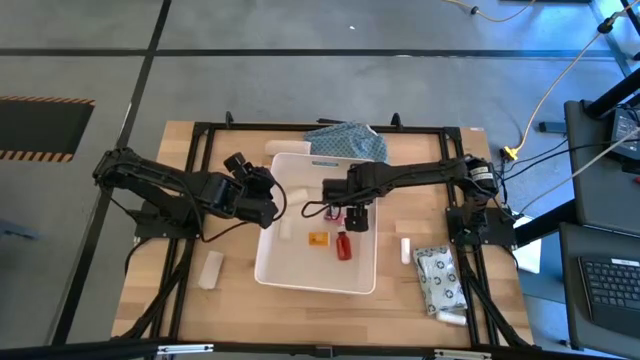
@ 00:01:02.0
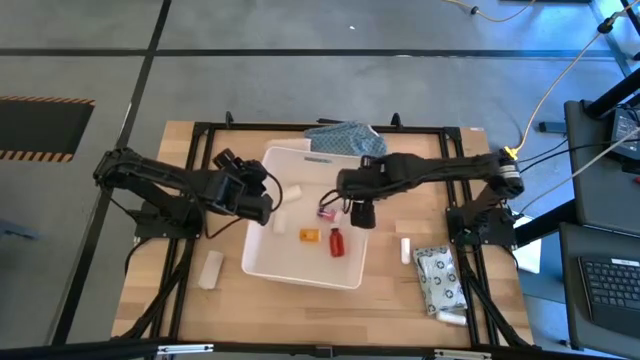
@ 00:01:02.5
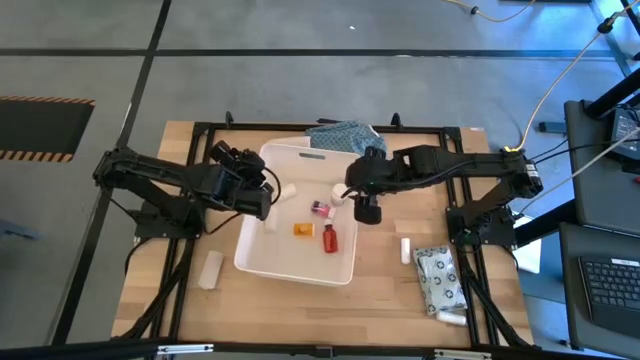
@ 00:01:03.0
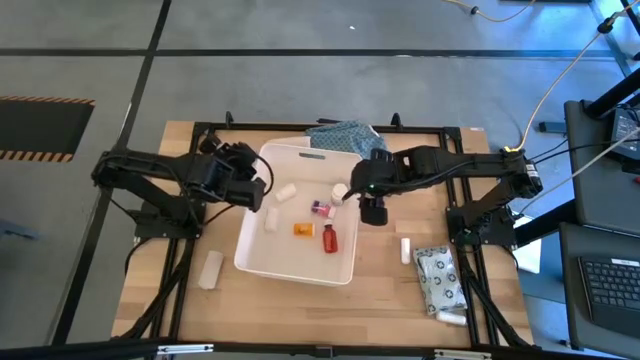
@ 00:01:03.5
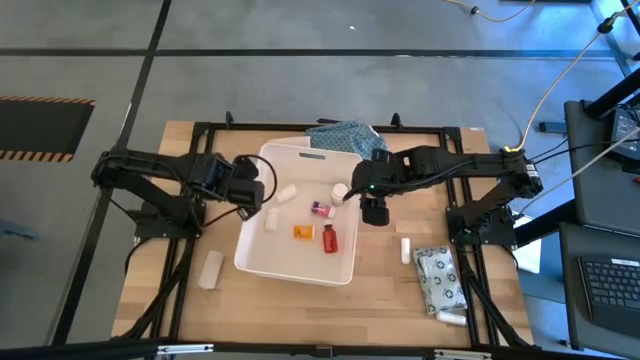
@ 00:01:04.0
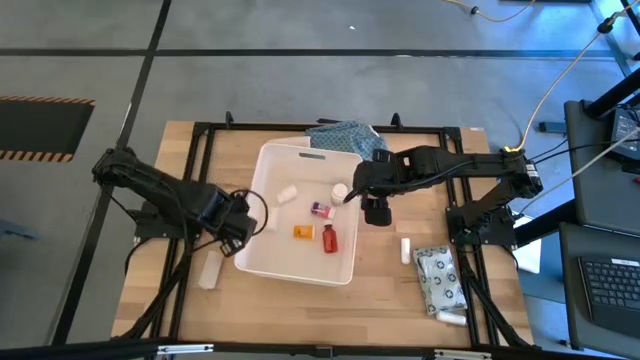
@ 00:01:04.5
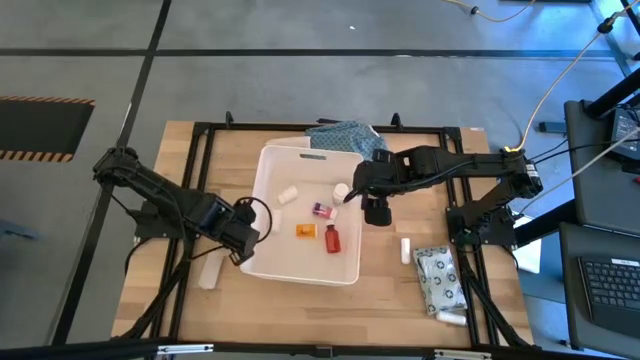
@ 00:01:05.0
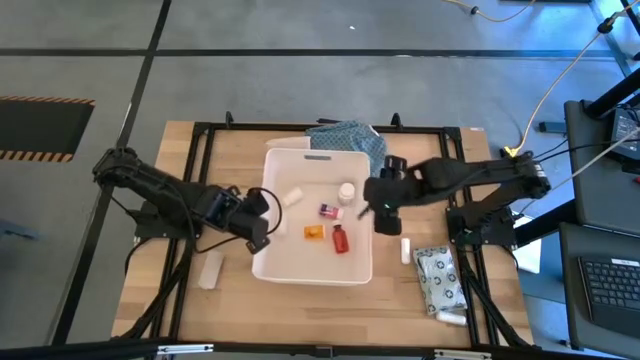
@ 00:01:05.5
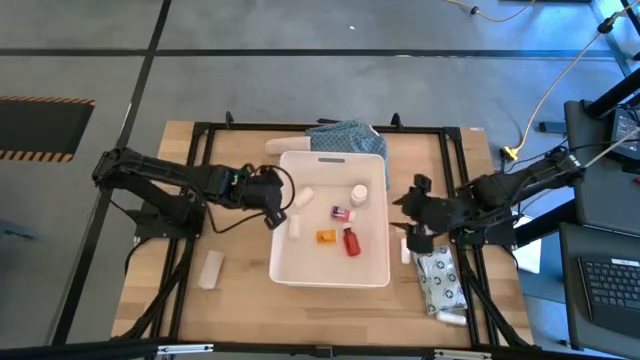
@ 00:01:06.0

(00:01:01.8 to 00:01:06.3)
Task: Pick & place medical supplies in basket/bin
Adjust the white bin

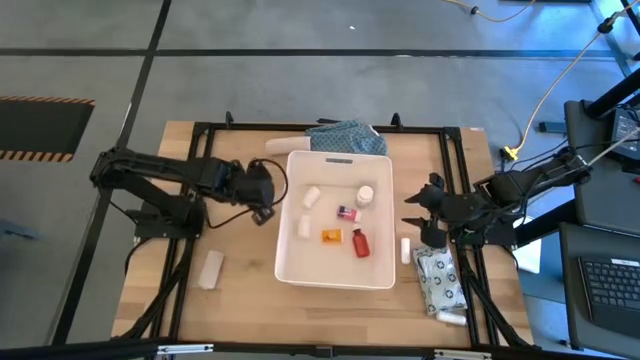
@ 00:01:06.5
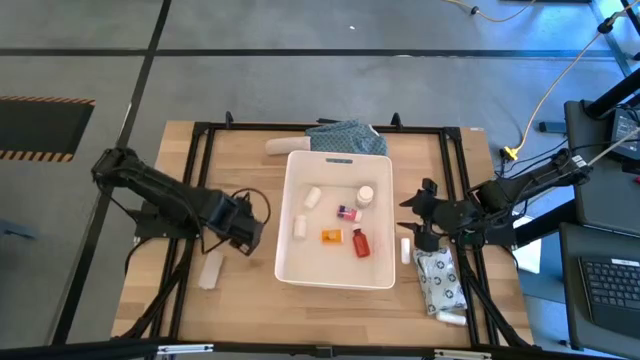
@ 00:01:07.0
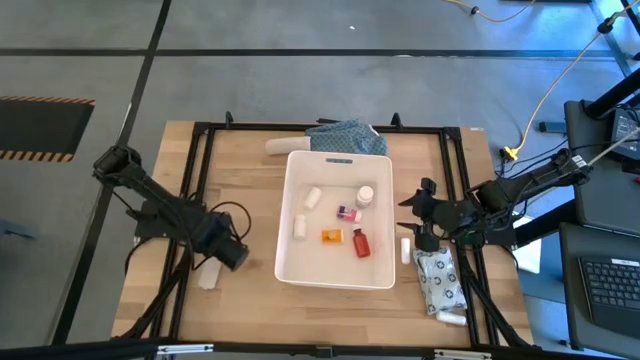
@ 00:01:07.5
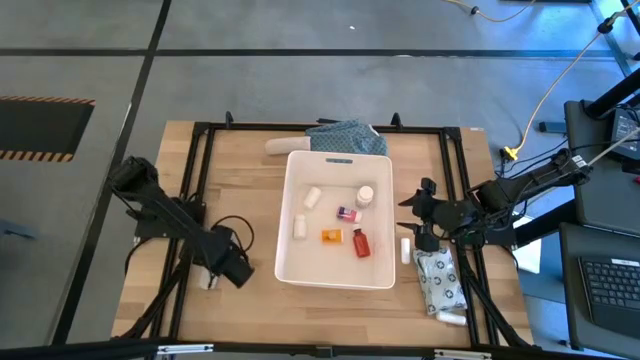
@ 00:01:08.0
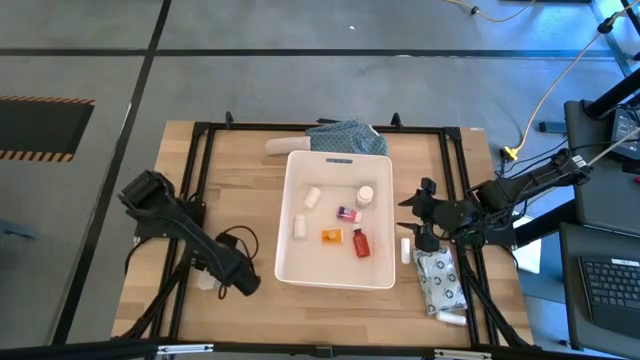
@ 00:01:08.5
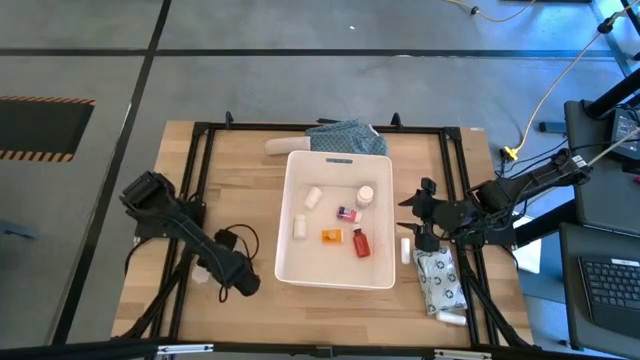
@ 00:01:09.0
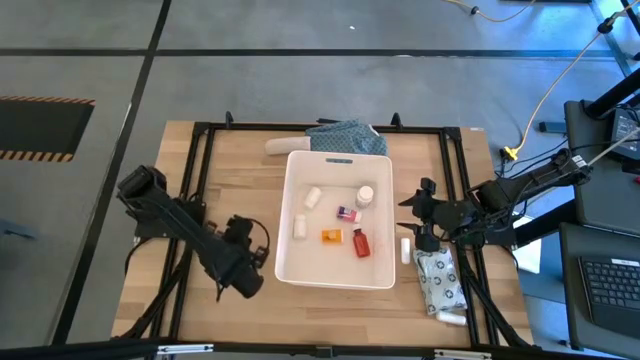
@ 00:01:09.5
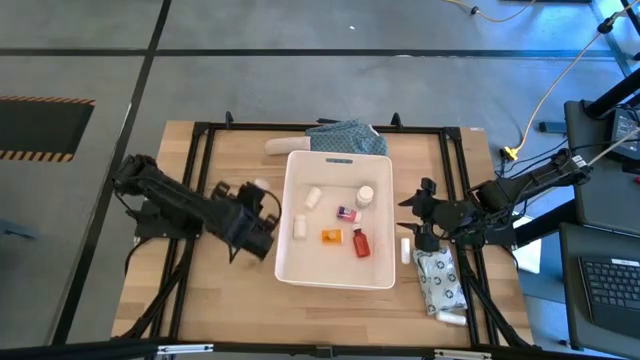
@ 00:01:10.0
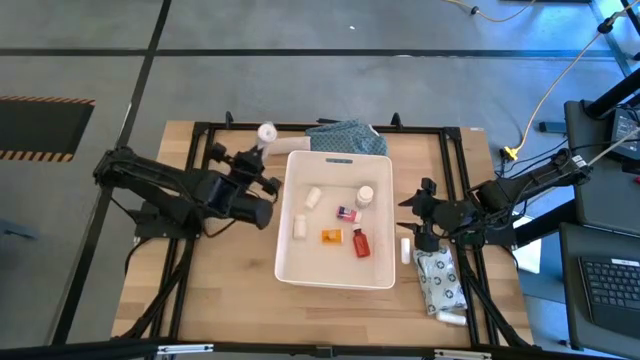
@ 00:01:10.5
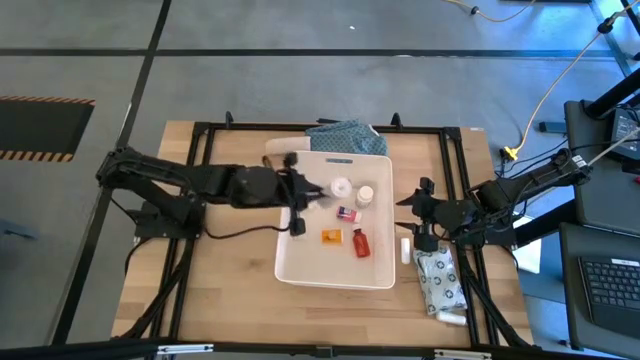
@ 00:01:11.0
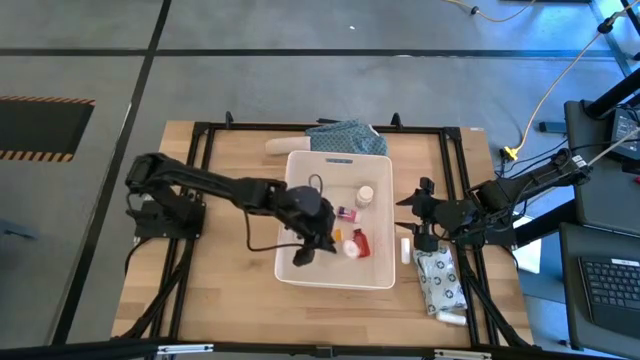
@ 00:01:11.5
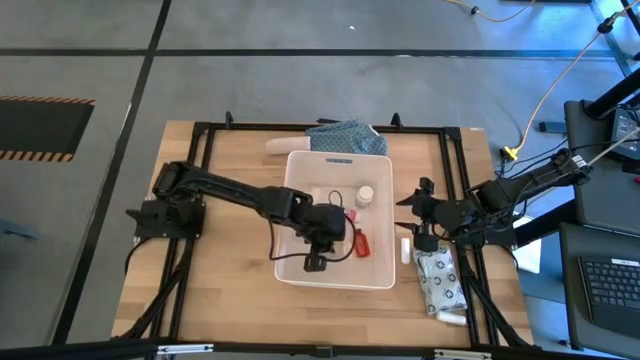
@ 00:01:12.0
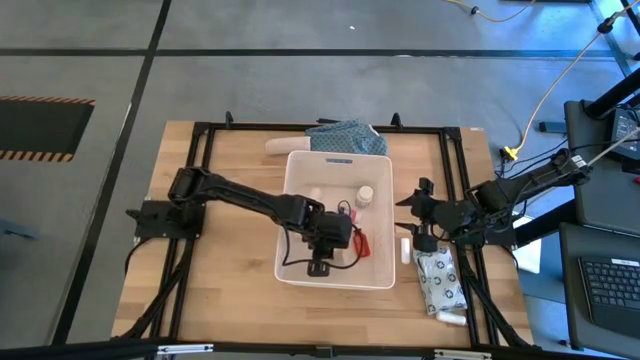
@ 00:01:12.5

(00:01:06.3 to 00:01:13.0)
Put the bottom white bandage into the white bin

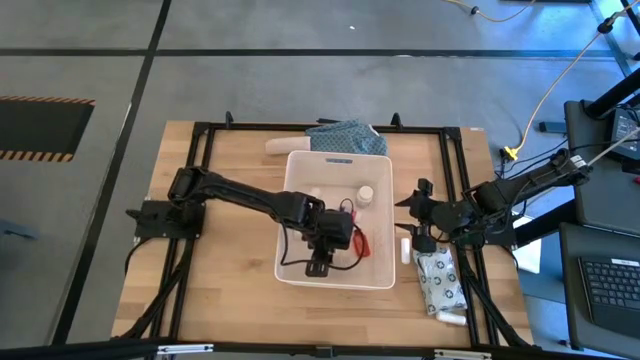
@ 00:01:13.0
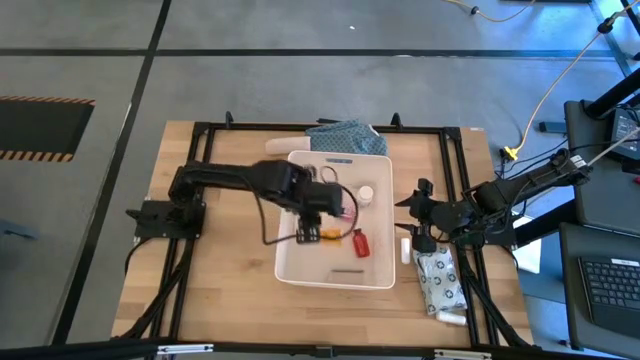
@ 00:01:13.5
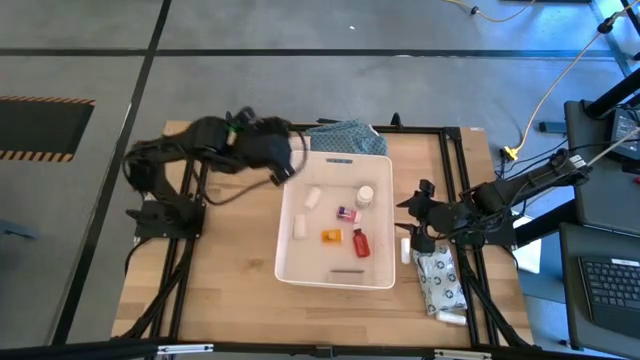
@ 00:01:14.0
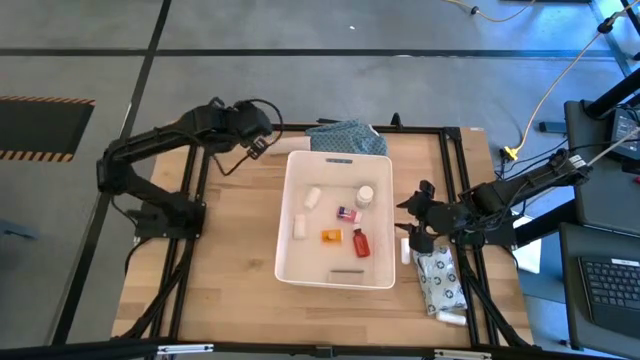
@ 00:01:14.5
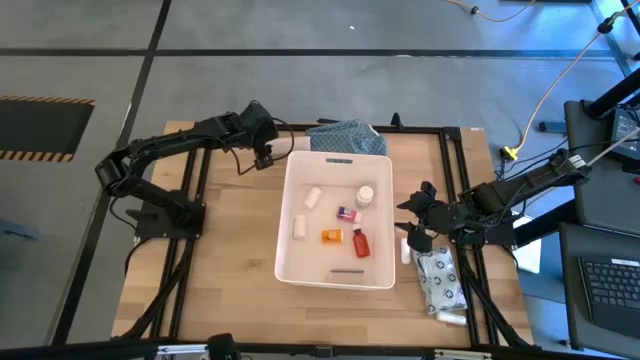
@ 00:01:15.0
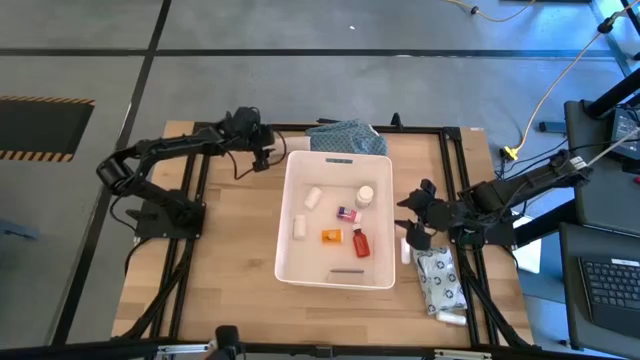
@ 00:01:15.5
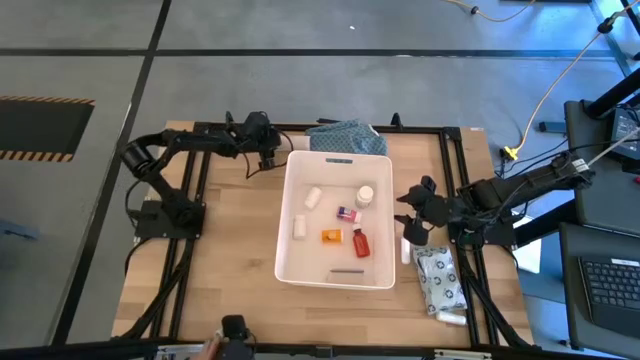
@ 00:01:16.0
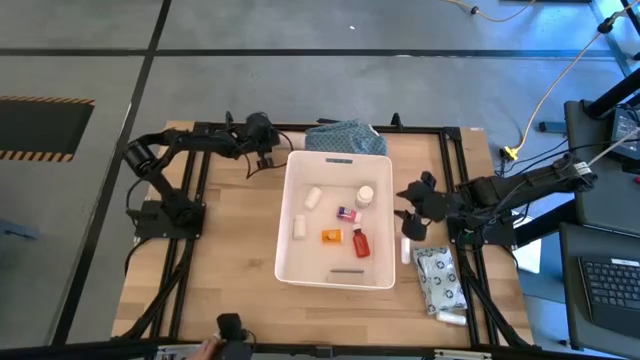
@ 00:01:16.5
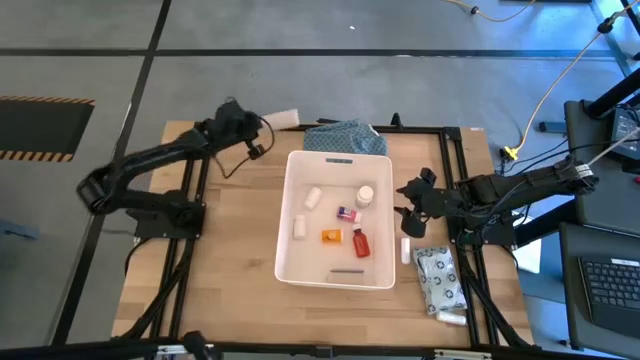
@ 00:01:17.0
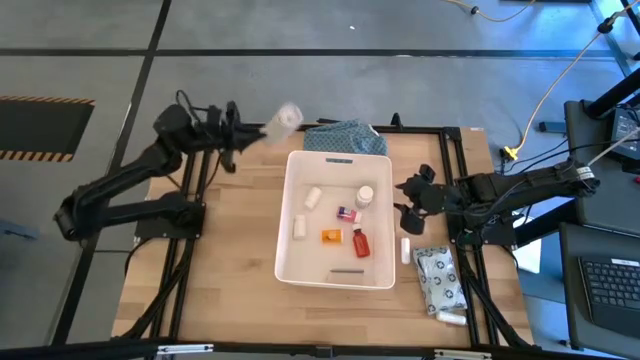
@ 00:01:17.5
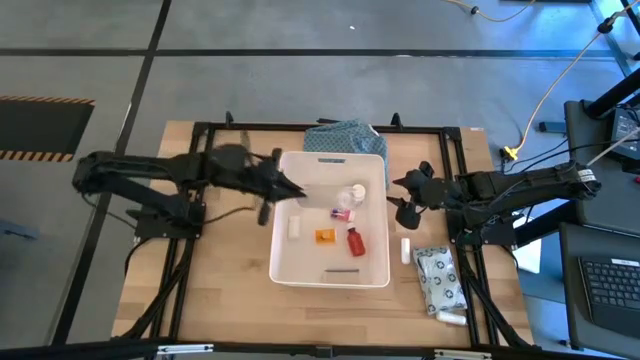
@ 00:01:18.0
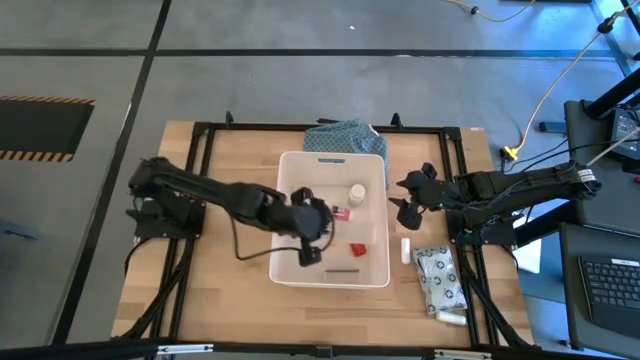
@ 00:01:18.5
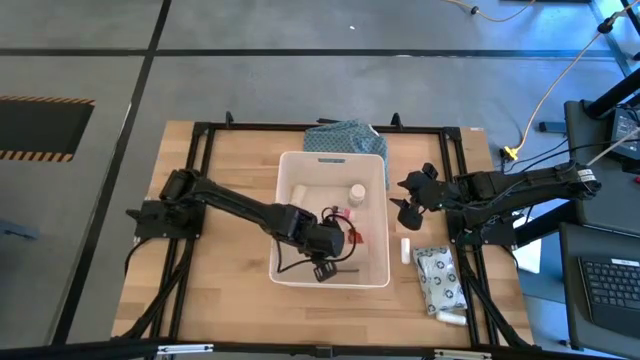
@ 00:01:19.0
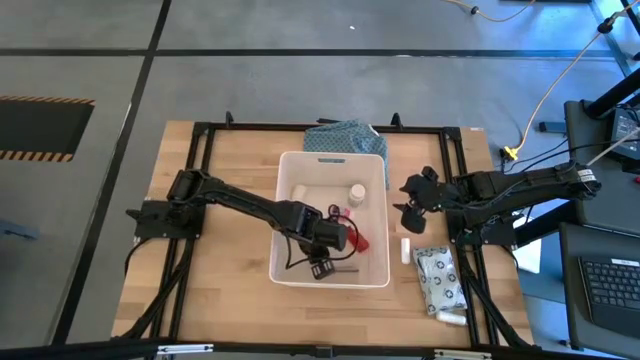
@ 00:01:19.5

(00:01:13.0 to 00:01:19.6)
Put the white bandage into the white bin

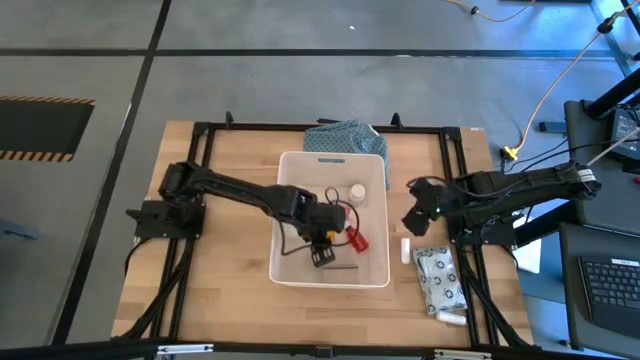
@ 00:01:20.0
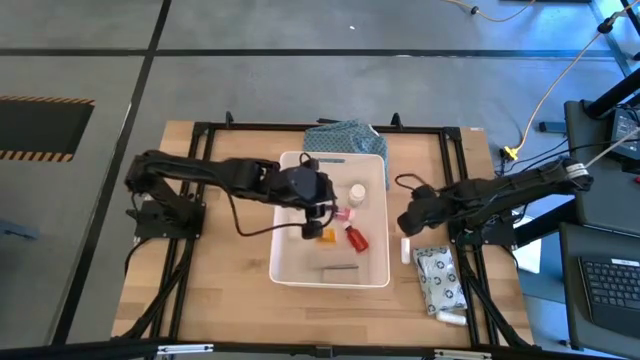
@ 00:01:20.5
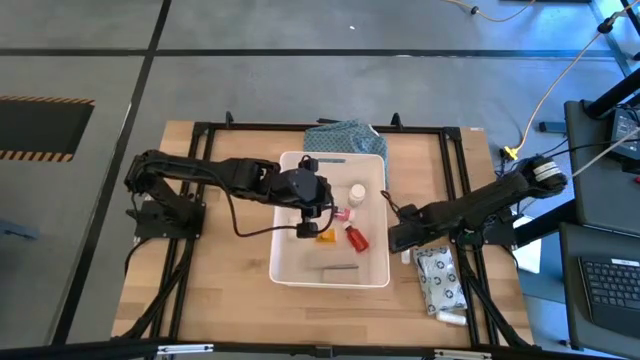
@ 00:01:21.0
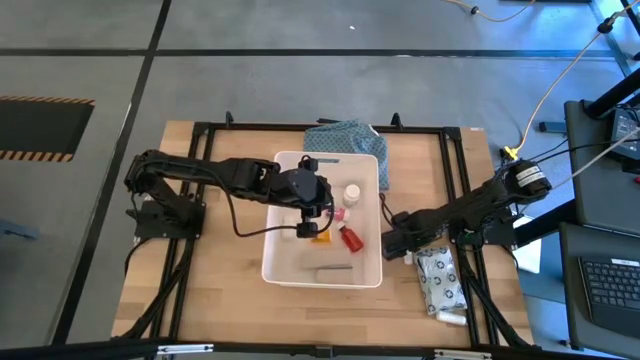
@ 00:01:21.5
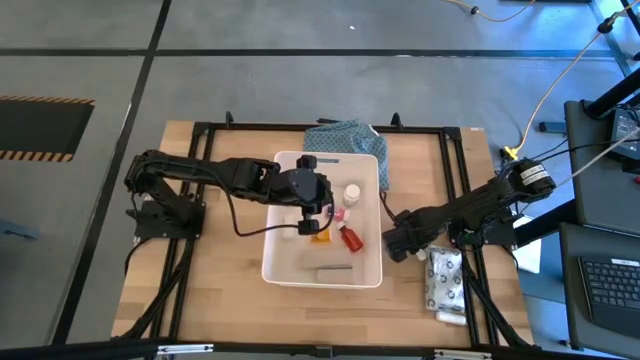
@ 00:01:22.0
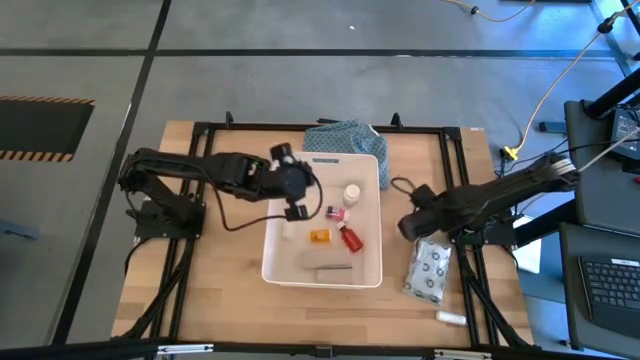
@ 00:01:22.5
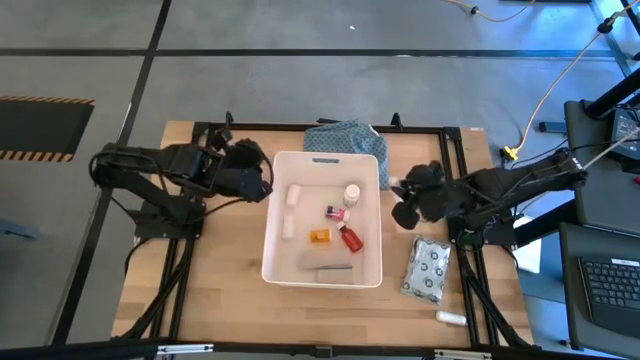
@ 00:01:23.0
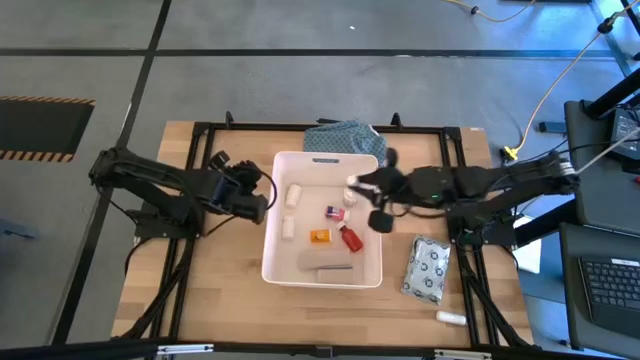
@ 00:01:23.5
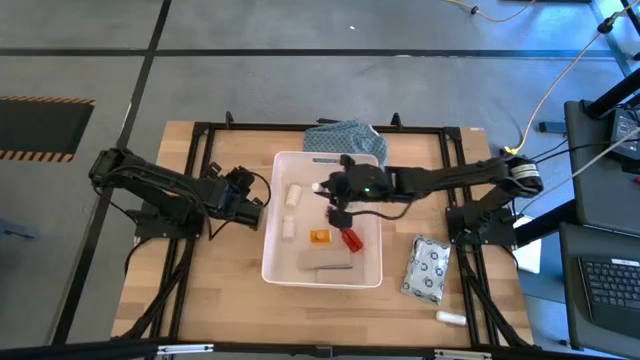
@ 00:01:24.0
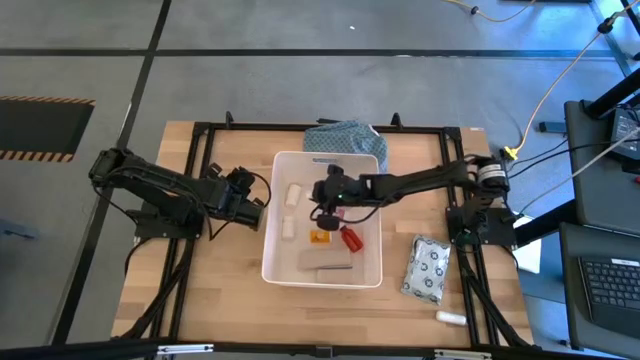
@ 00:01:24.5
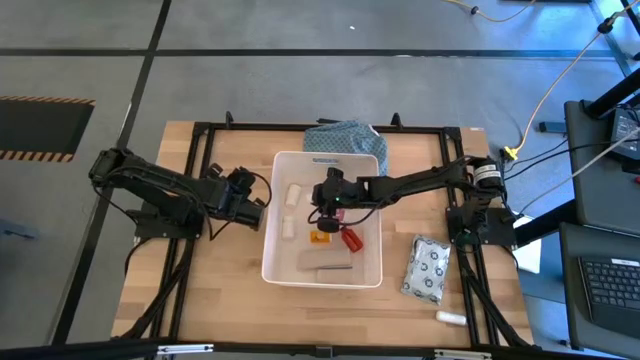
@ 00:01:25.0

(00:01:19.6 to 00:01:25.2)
Put the top white rolled gauze into the white bin
